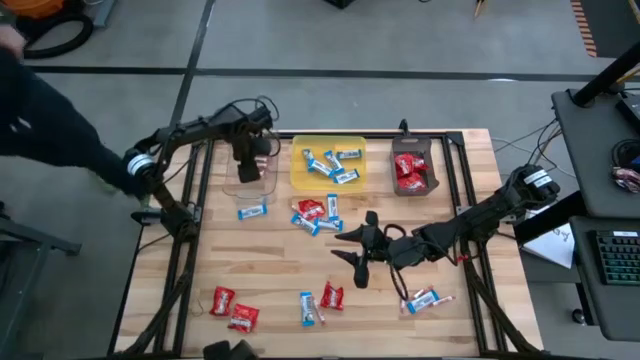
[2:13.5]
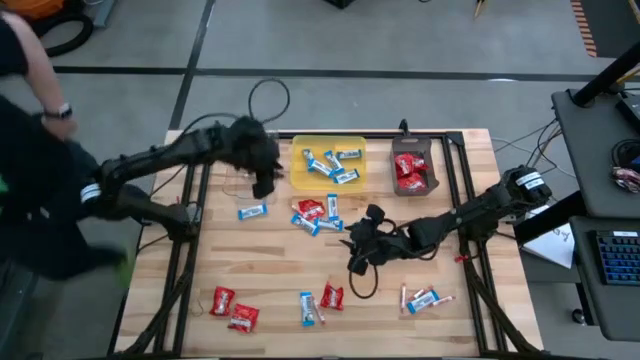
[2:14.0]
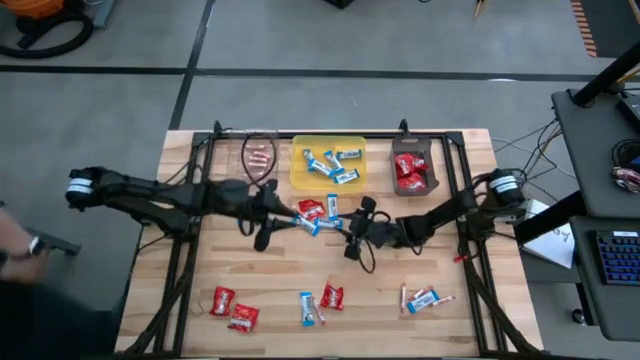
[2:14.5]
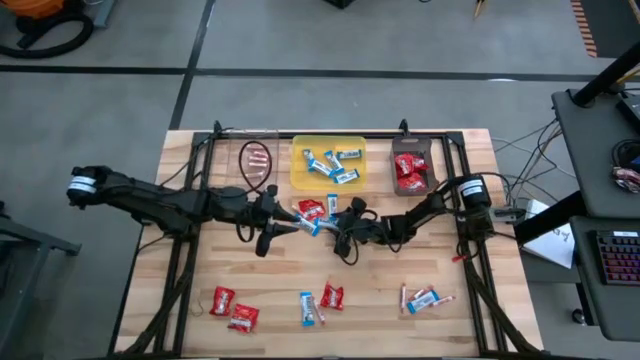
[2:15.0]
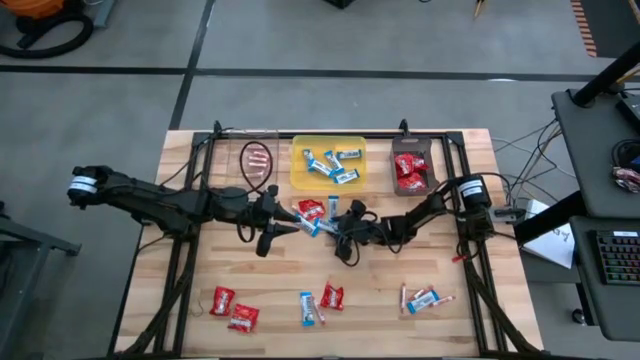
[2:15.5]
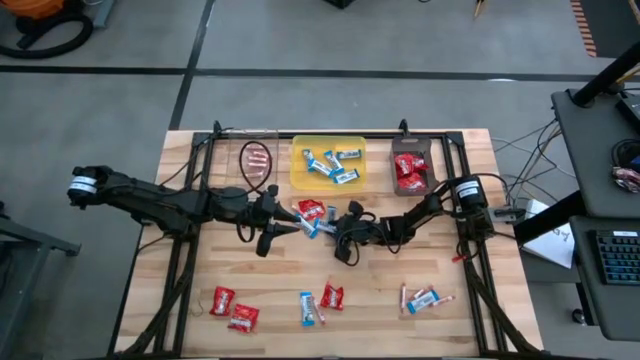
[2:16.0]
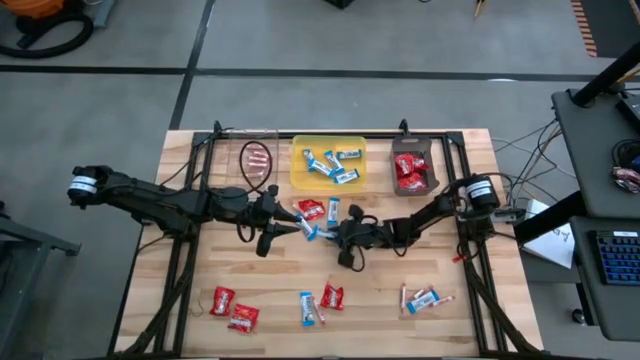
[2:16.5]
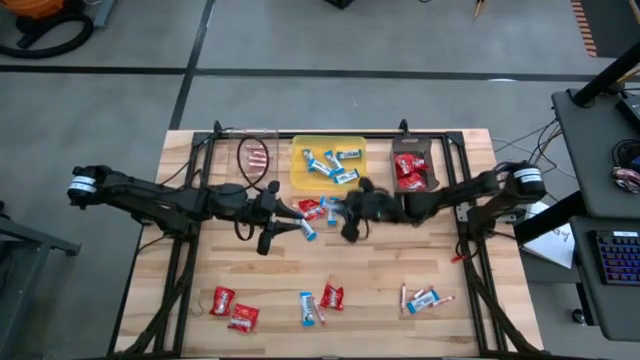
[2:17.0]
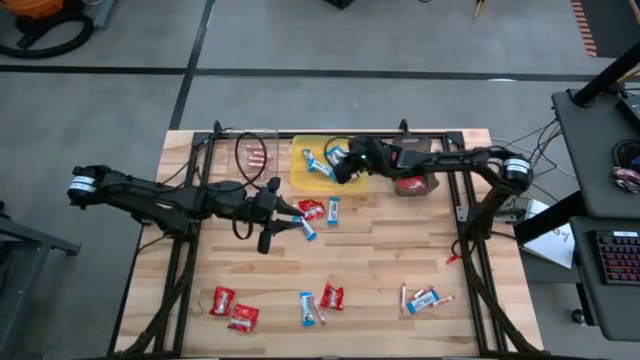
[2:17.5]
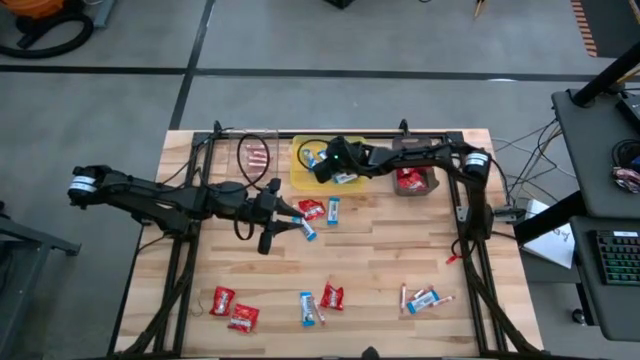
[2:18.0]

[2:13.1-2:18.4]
Task: Sort candy
Put the white chocolate into the yellow bin

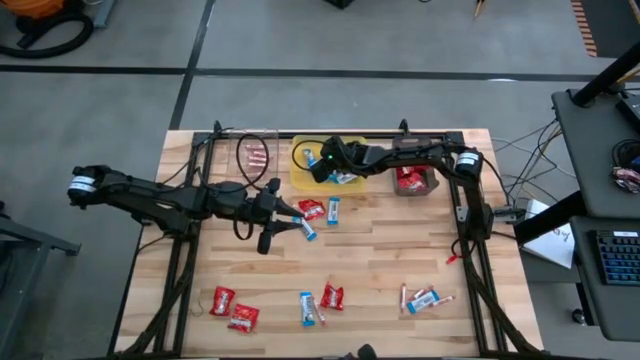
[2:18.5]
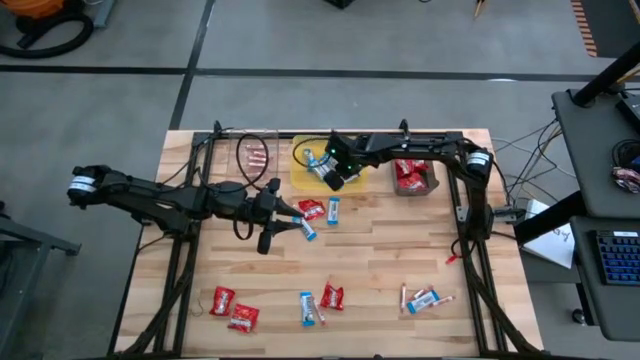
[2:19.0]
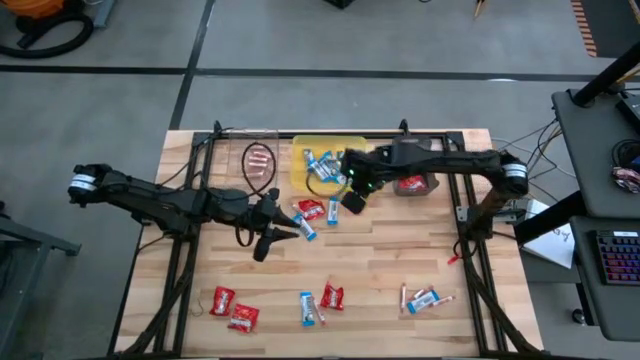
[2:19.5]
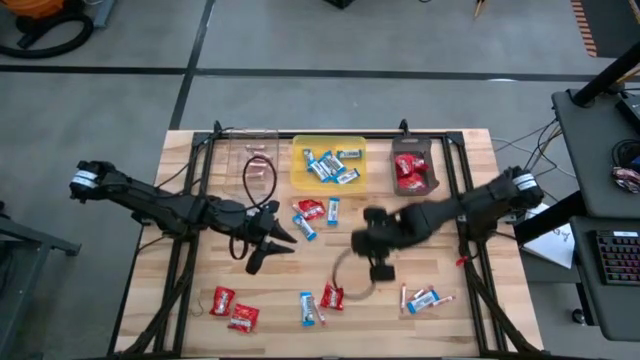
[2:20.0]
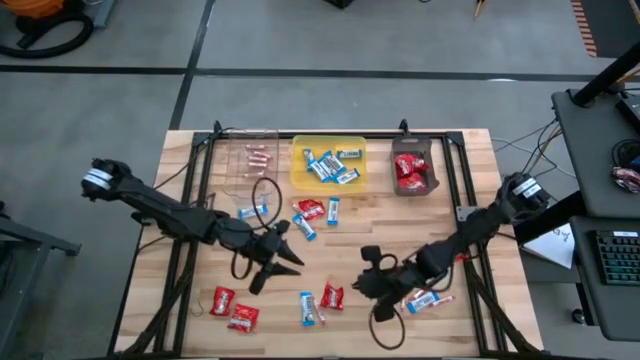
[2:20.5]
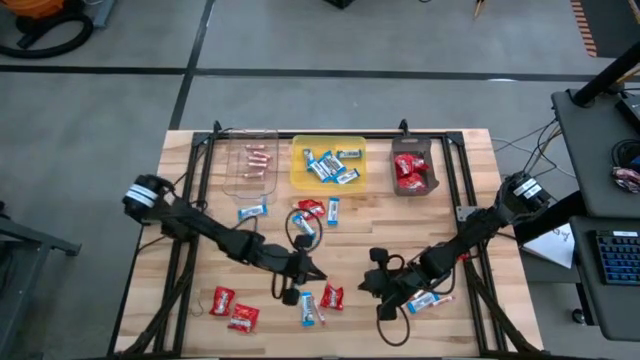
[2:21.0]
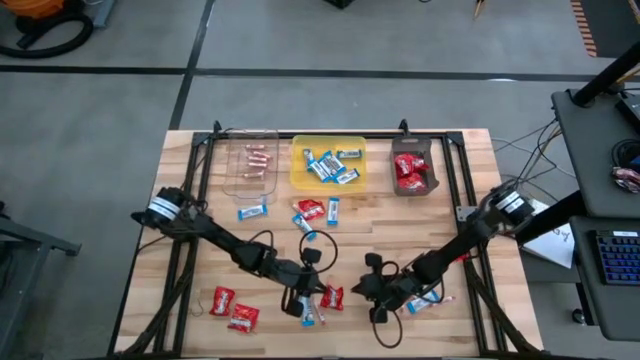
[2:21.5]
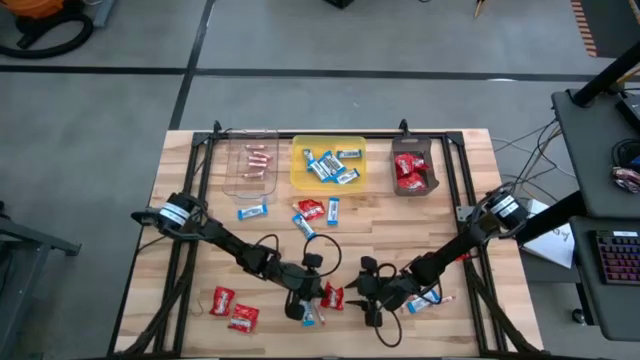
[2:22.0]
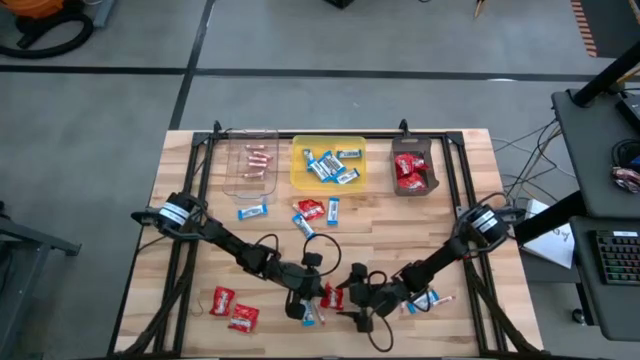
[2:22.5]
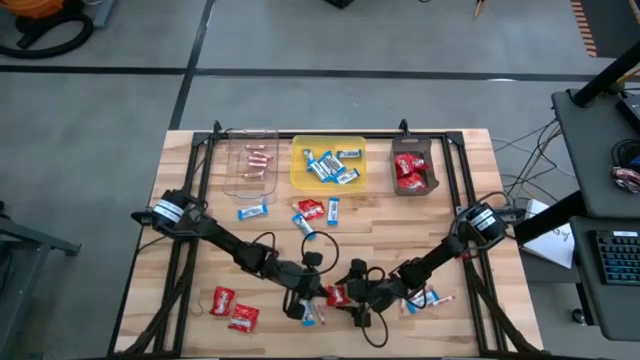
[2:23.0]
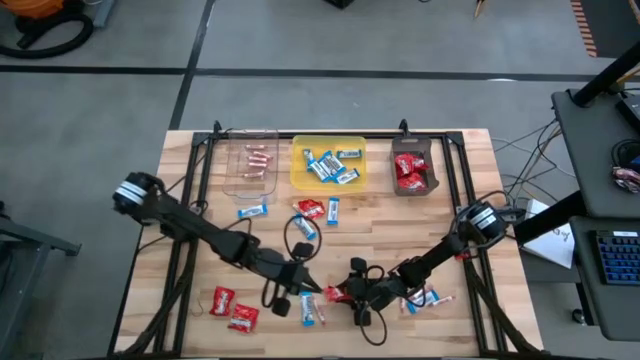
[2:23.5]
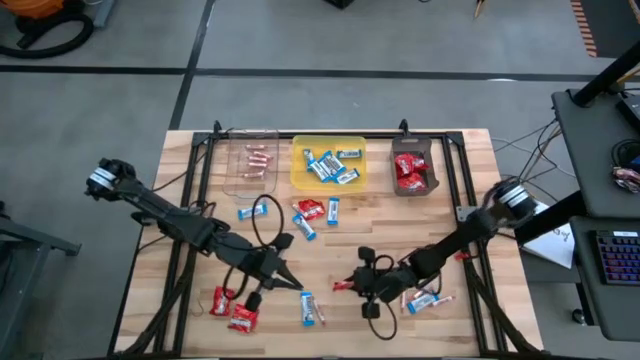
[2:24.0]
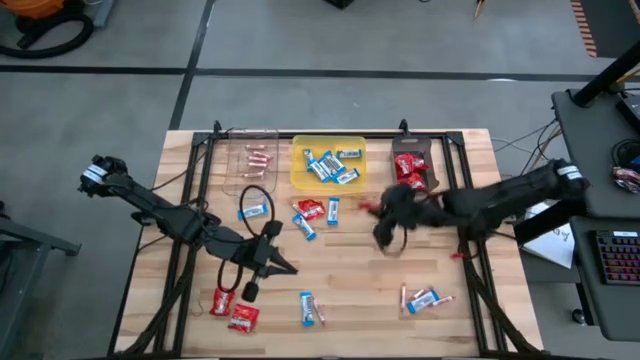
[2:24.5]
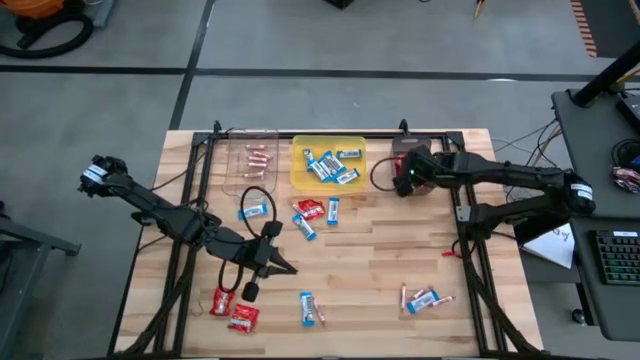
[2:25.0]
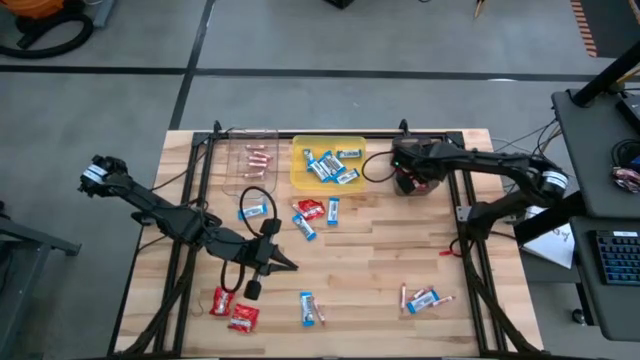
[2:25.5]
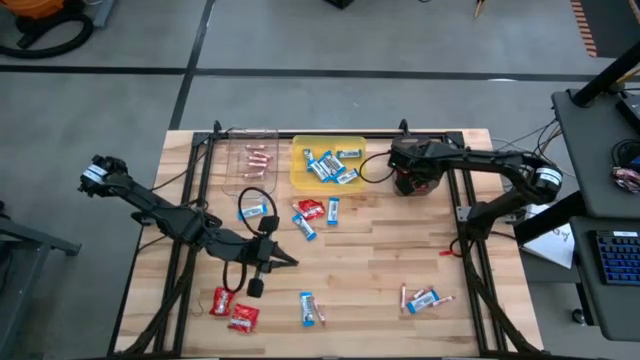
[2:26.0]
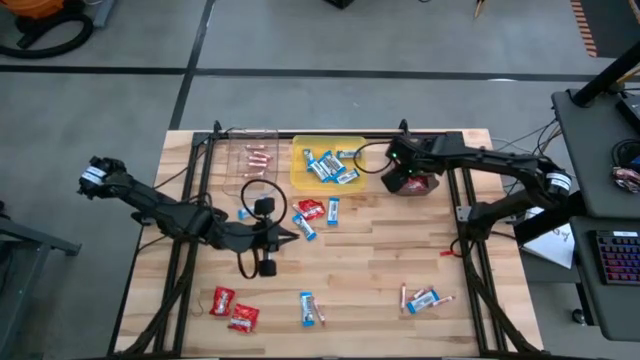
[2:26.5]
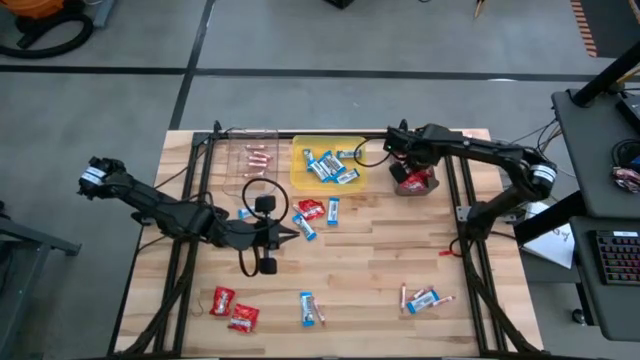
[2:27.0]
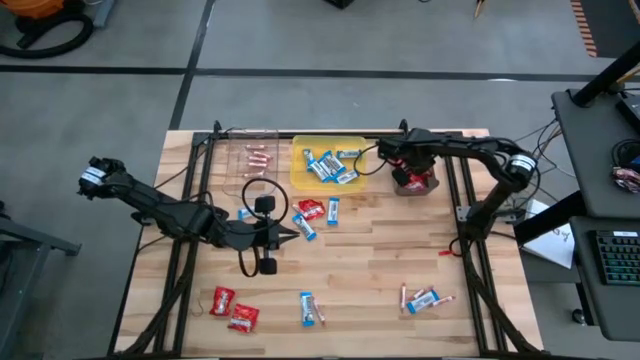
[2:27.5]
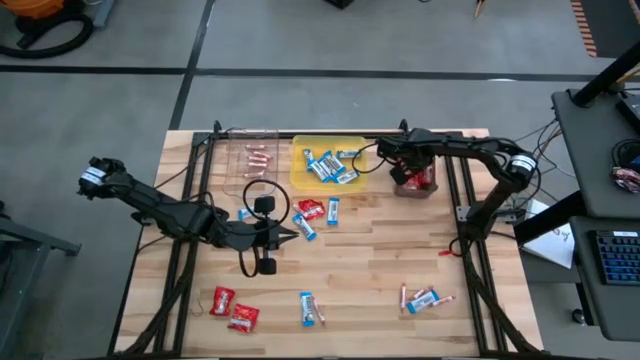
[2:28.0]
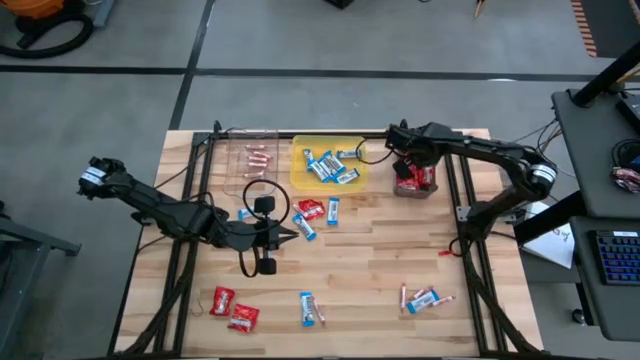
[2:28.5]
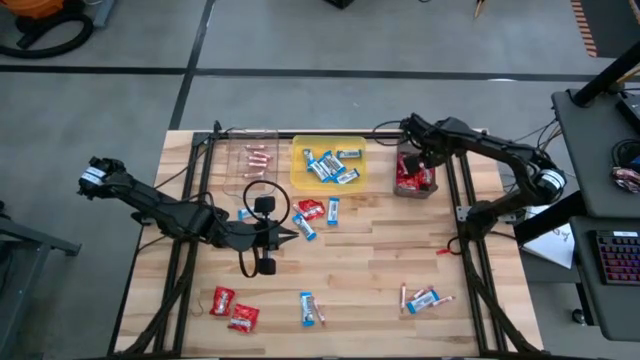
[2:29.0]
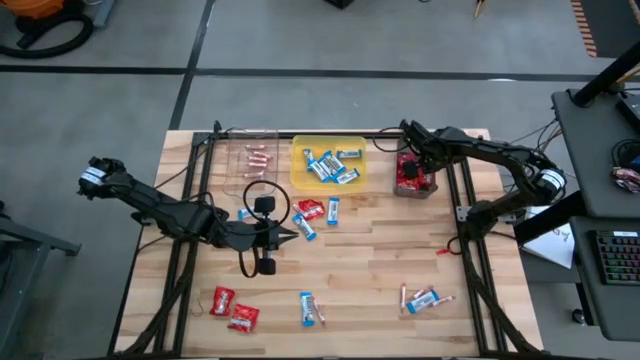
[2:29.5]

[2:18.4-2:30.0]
Put the red candy into the black bin

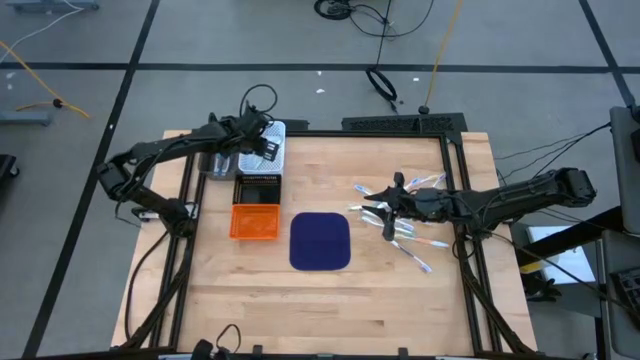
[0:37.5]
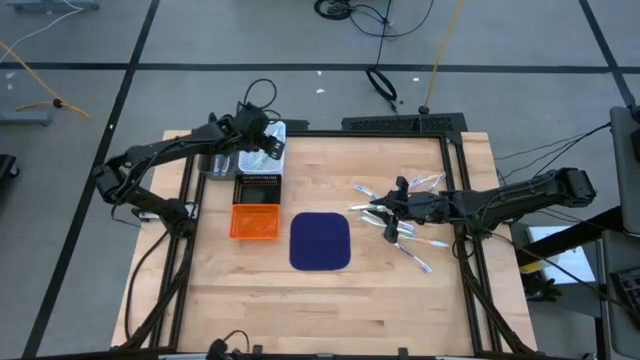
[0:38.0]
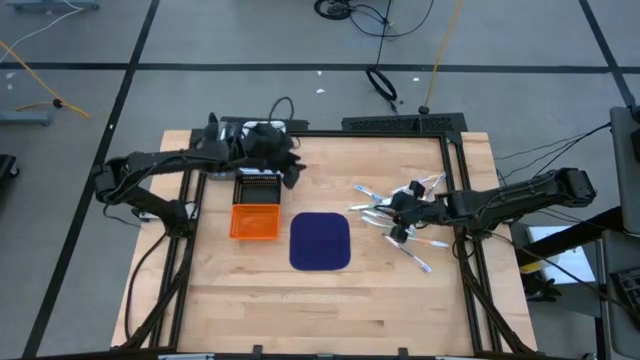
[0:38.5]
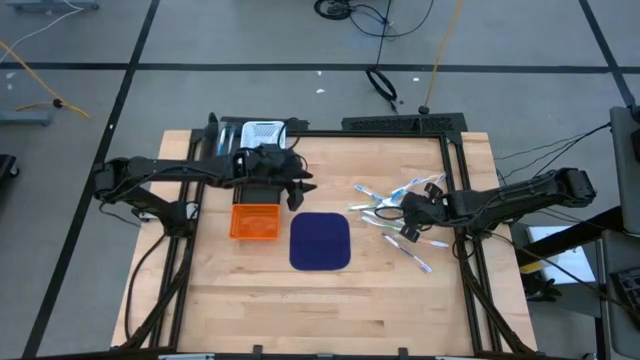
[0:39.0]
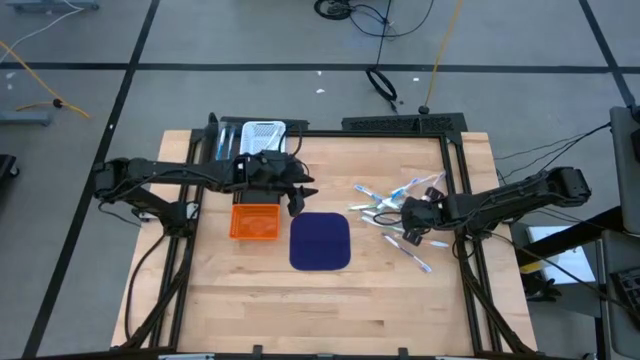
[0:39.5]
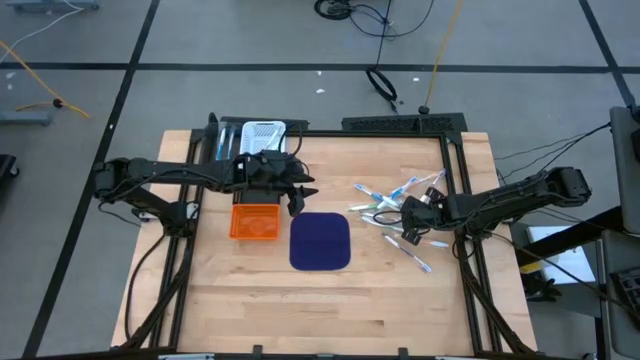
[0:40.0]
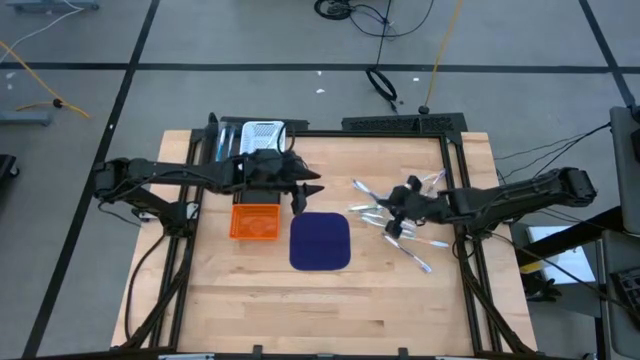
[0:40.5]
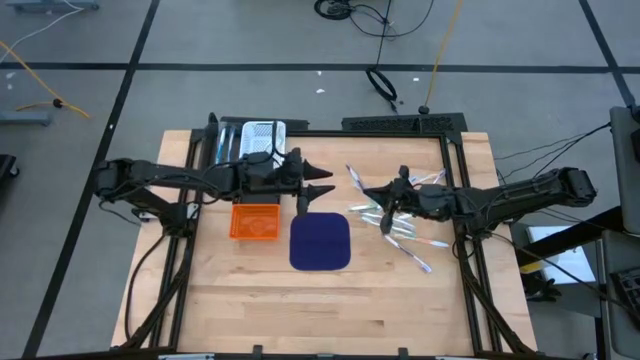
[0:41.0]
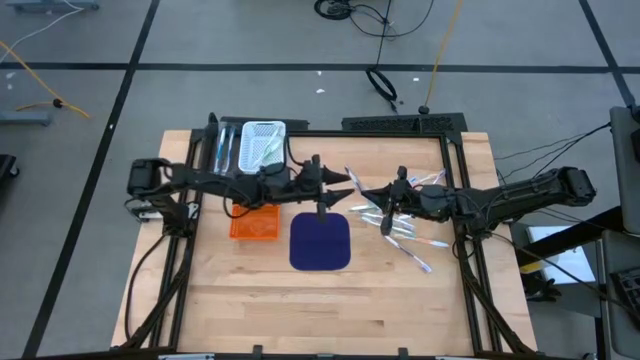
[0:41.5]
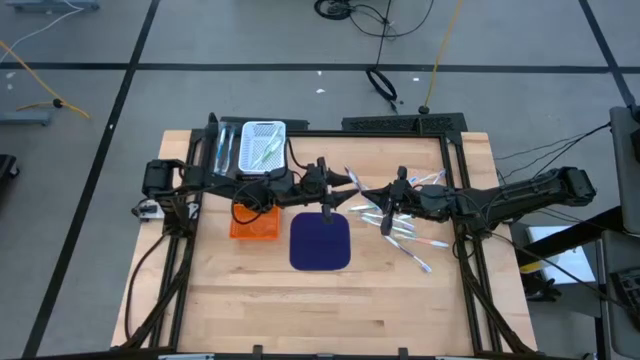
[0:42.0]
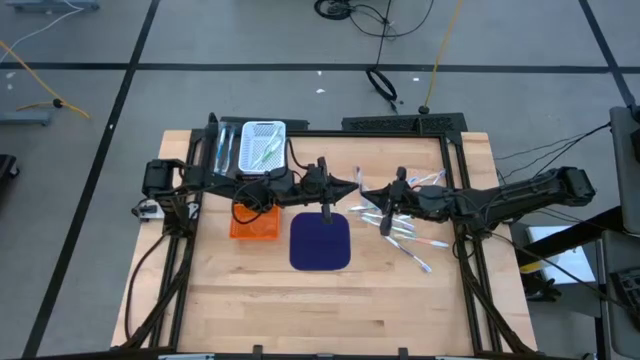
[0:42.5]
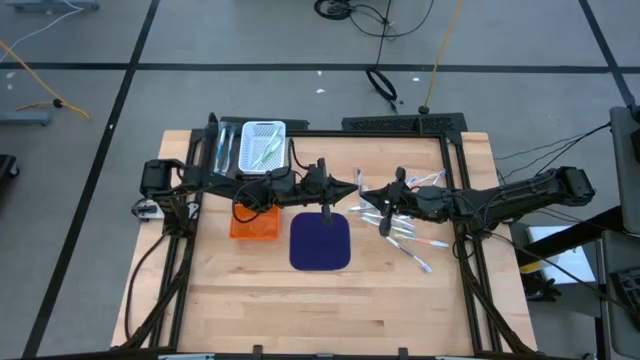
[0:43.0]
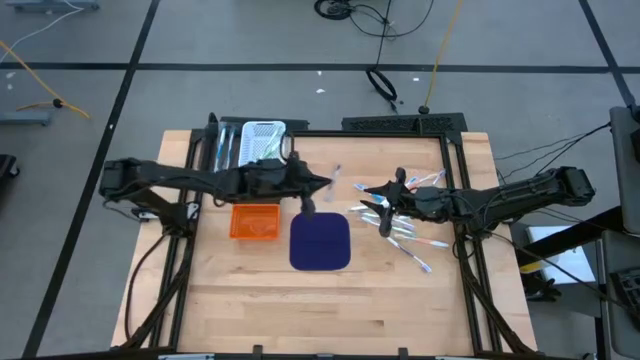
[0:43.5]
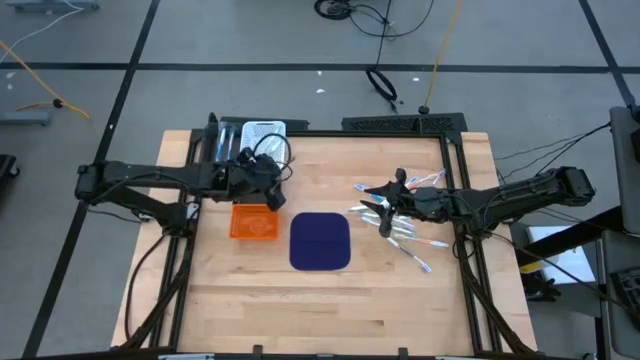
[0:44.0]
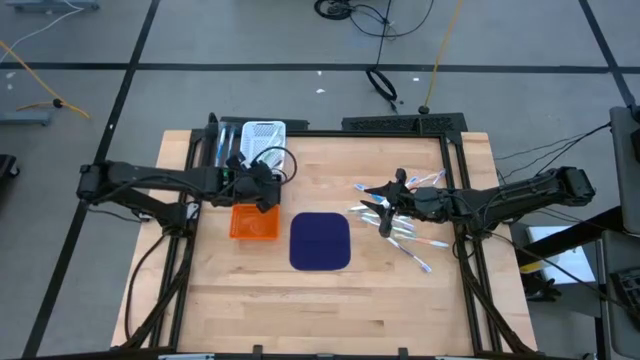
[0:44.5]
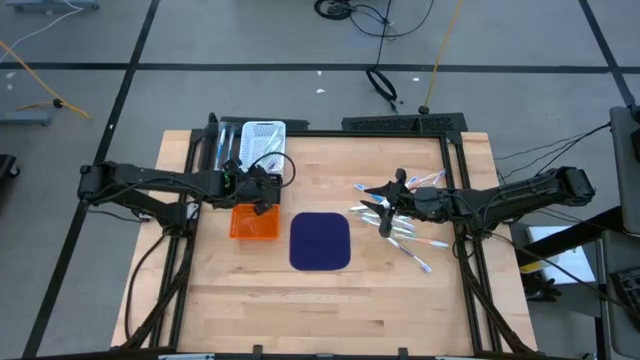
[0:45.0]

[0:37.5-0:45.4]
Task: Pick & Place Toothbrushes
Put the violet toothbrush into the black bin
